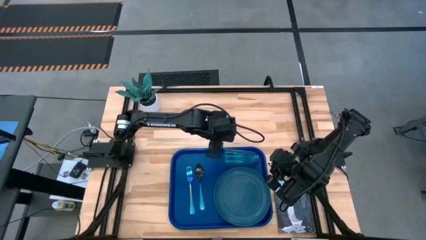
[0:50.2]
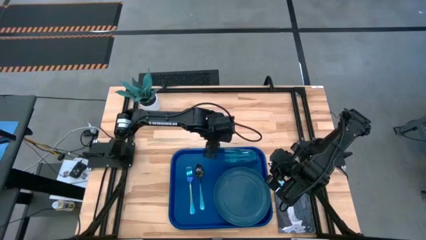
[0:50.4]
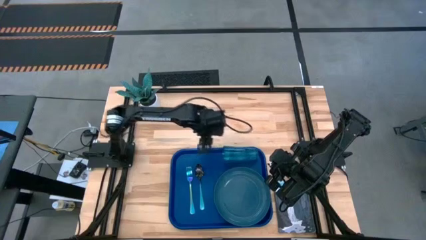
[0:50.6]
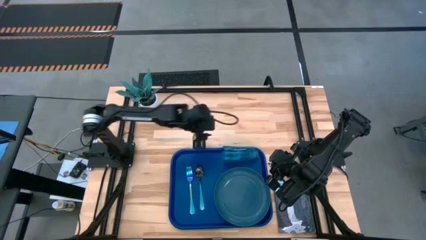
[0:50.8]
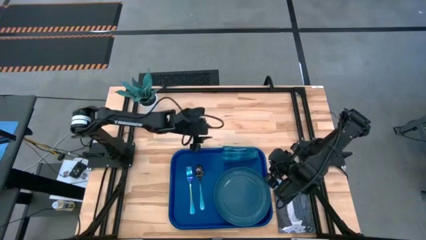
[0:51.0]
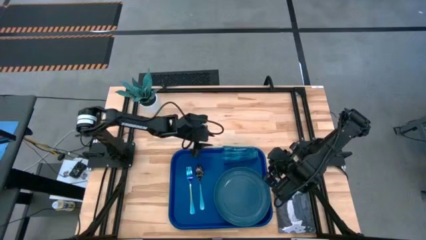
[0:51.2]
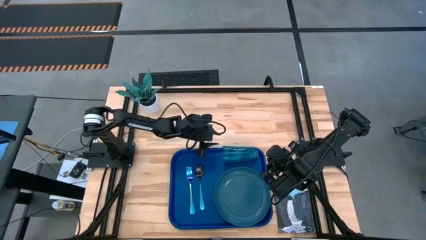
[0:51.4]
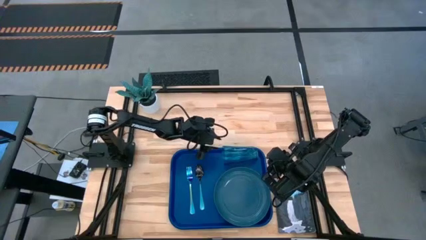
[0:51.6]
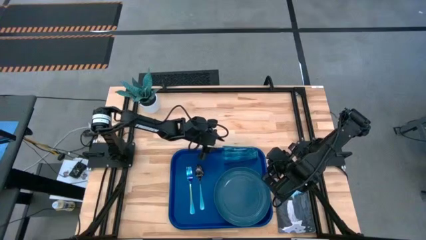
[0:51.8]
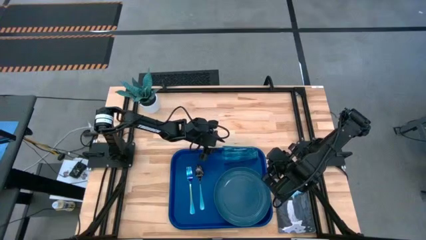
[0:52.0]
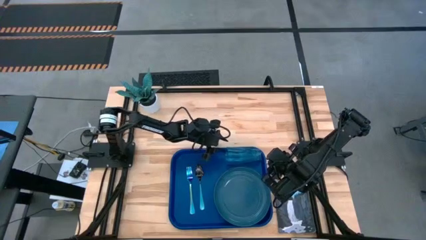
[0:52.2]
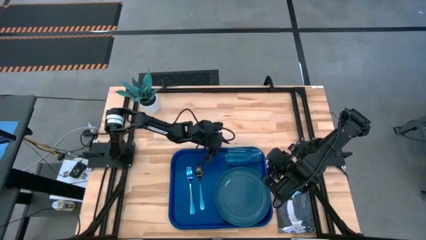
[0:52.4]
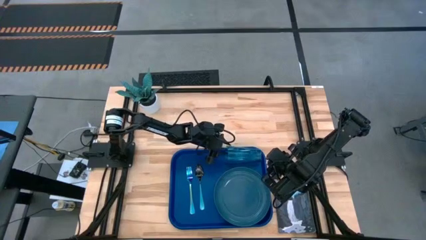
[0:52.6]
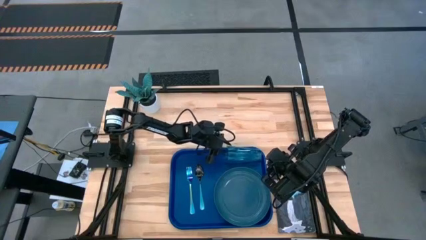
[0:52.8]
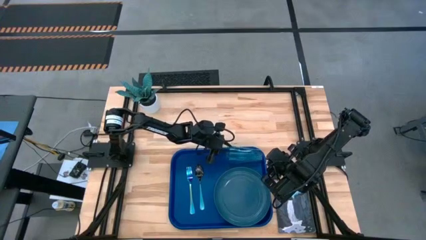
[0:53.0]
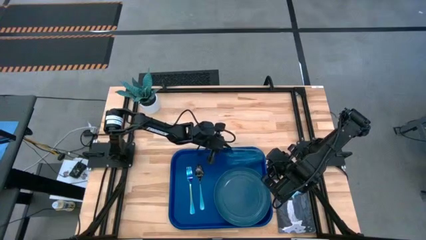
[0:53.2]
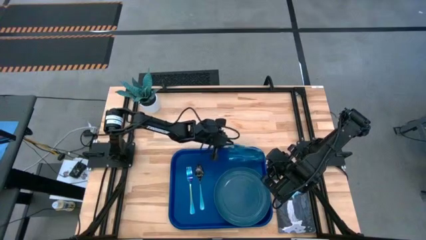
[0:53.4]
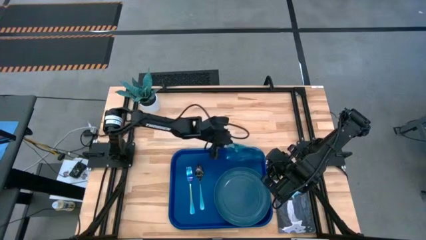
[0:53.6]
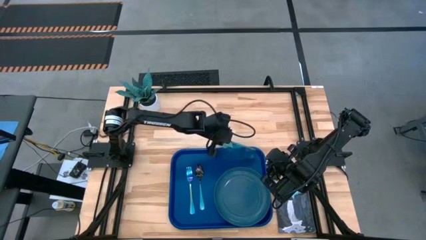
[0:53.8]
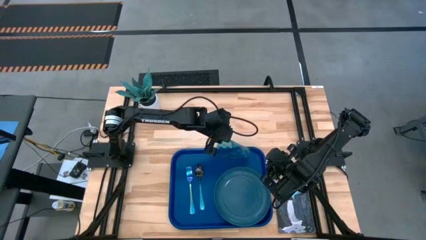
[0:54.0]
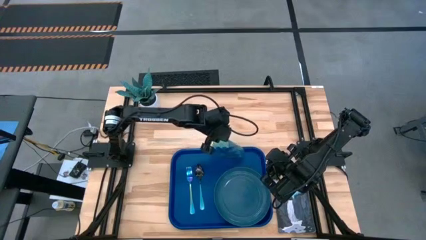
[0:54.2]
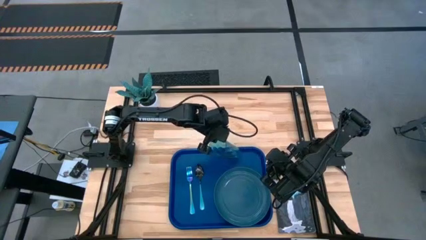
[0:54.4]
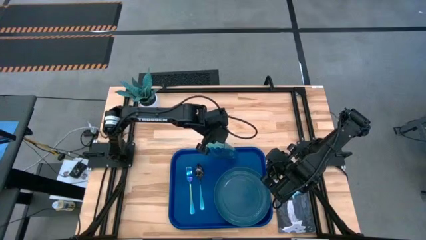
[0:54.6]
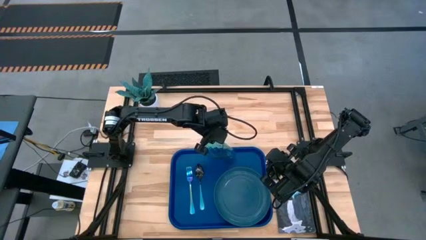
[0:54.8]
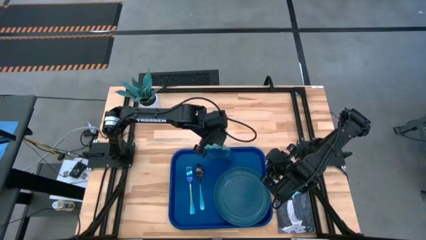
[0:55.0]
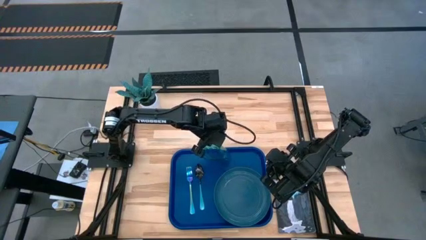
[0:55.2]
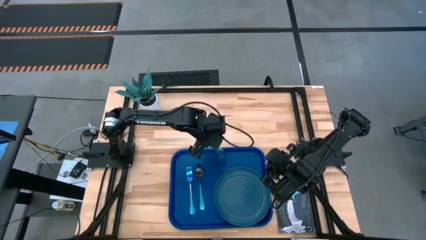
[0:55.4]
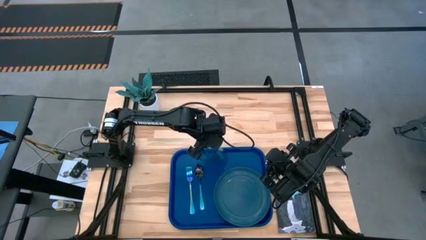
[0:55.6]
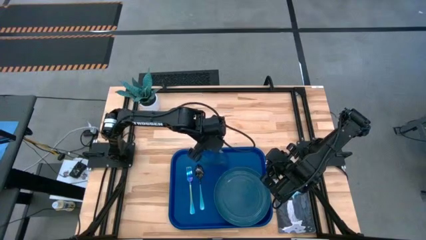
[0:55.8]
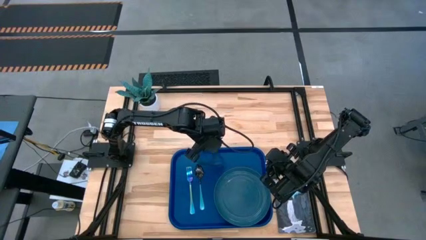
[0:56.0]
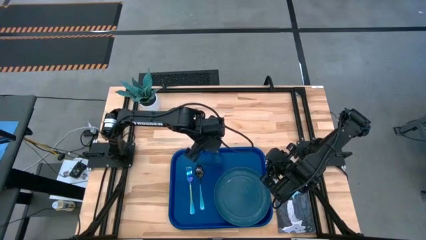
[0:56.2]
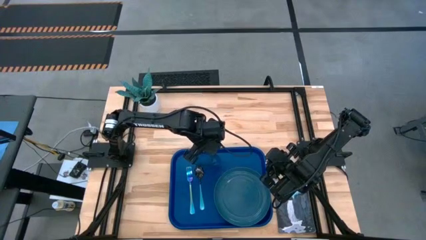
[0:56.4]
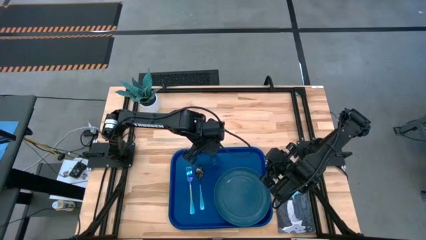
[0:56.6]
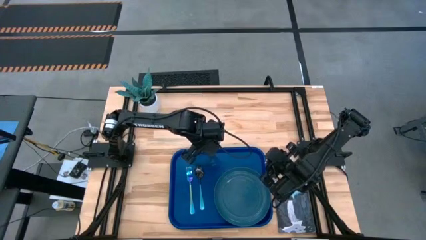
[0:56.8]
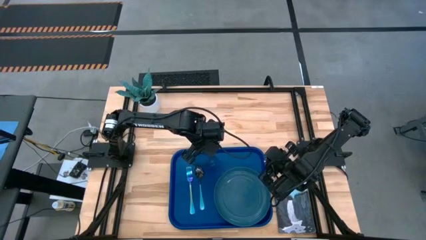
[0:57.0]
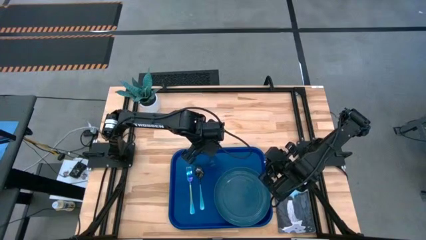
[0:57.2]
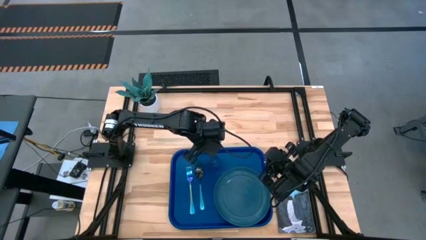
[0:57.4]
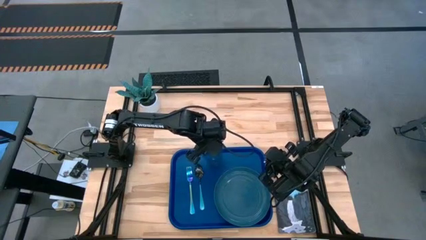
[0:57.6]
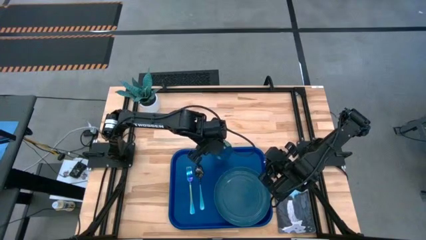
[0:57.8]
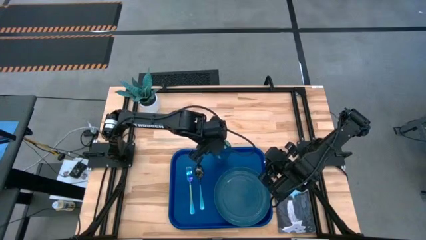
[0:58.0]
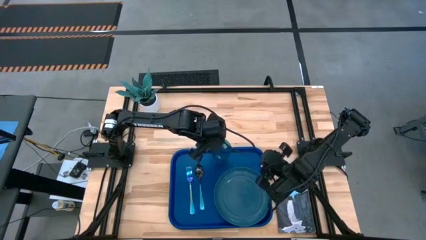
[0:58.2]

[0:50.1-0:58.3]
Task: Pick and place plate/cup/fork/spoon on tray
Put the blue cup on the blue tray

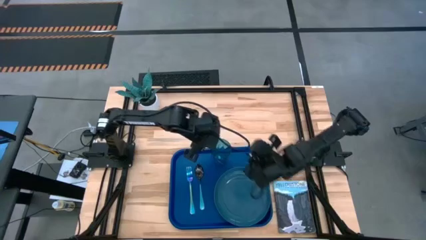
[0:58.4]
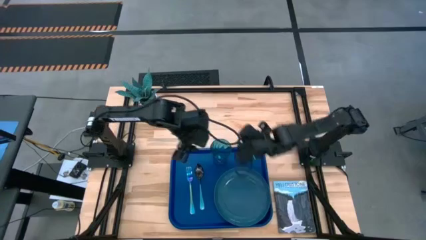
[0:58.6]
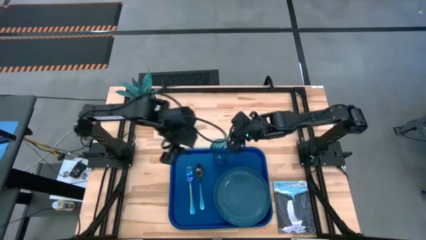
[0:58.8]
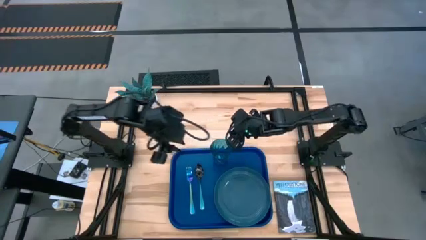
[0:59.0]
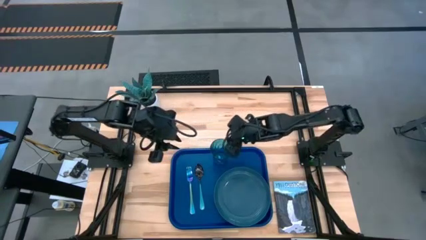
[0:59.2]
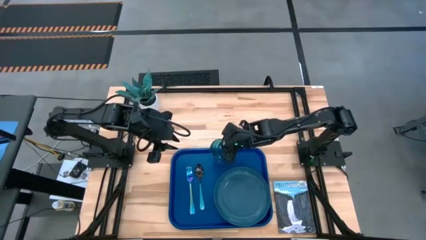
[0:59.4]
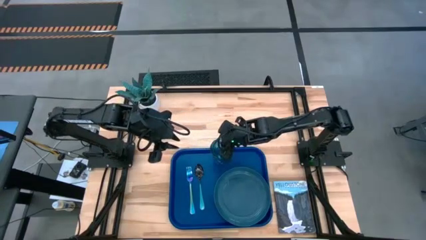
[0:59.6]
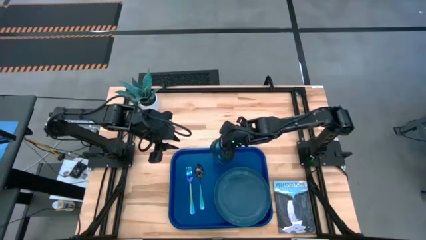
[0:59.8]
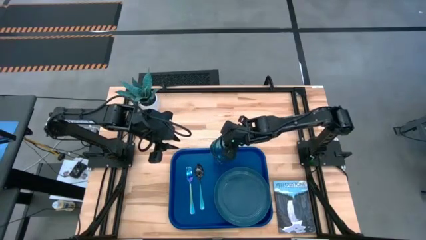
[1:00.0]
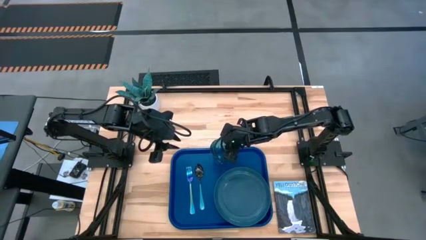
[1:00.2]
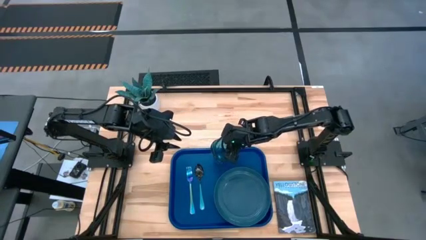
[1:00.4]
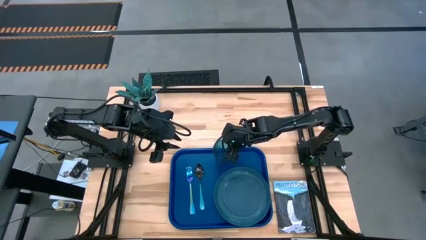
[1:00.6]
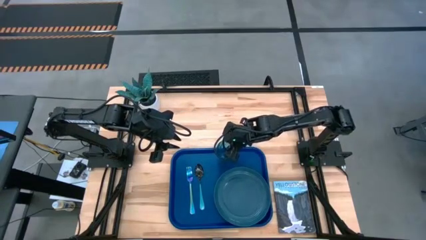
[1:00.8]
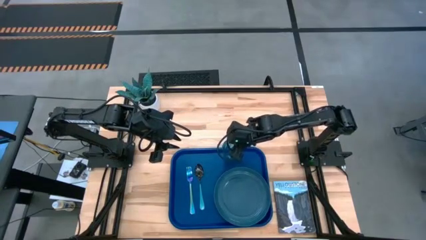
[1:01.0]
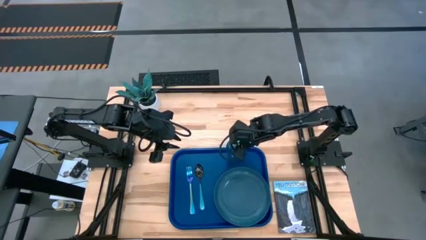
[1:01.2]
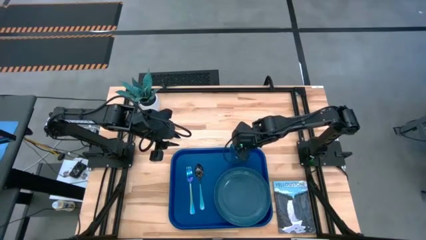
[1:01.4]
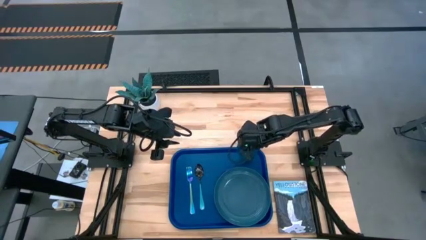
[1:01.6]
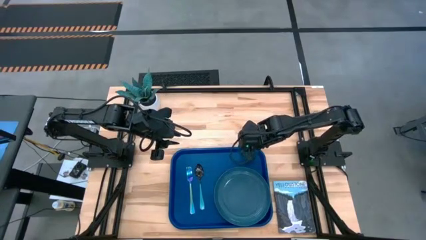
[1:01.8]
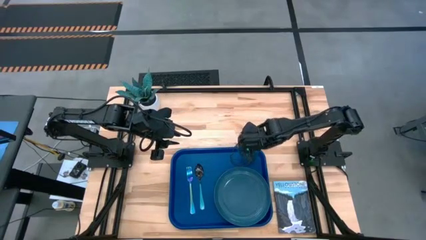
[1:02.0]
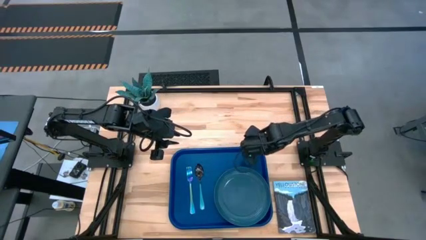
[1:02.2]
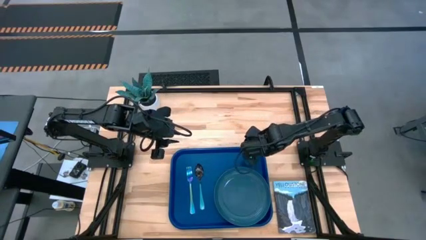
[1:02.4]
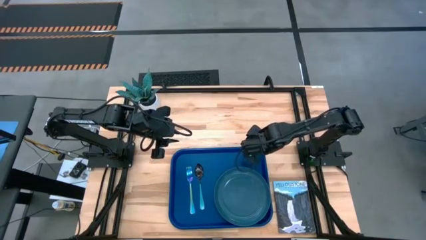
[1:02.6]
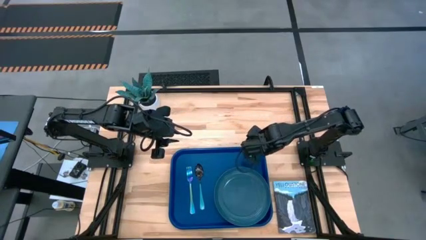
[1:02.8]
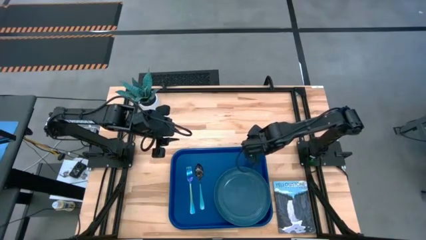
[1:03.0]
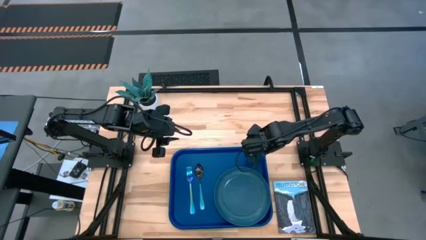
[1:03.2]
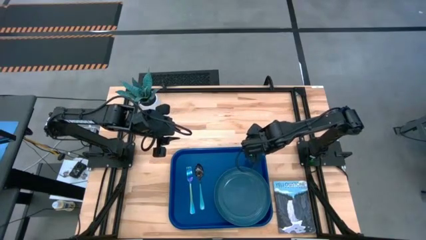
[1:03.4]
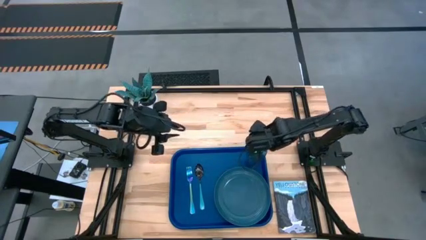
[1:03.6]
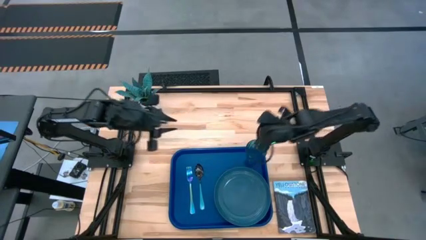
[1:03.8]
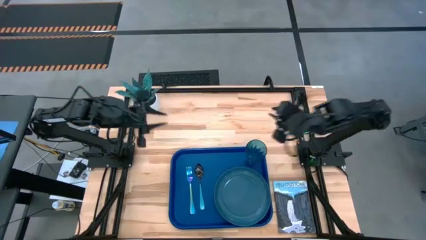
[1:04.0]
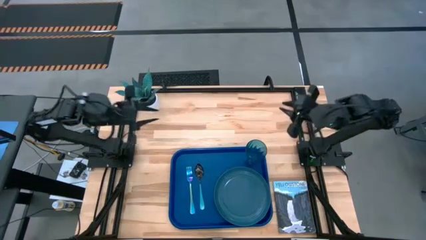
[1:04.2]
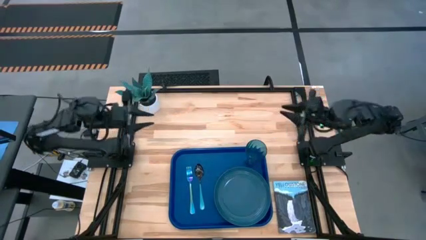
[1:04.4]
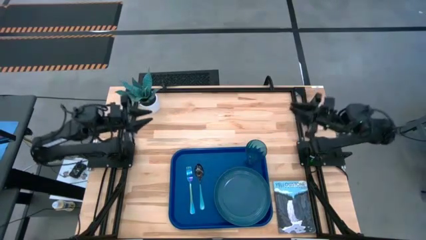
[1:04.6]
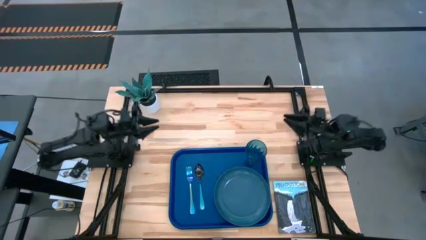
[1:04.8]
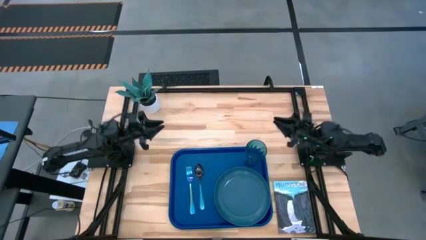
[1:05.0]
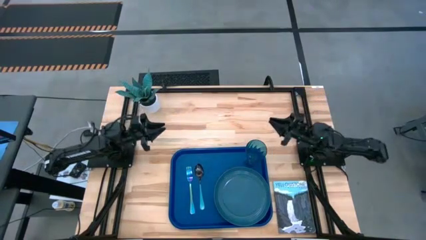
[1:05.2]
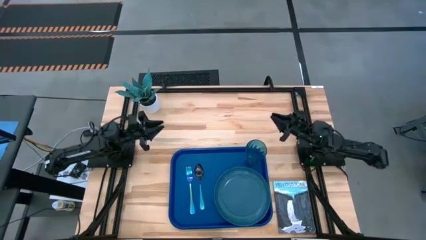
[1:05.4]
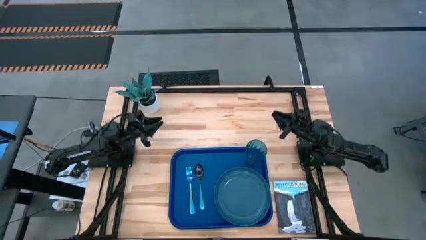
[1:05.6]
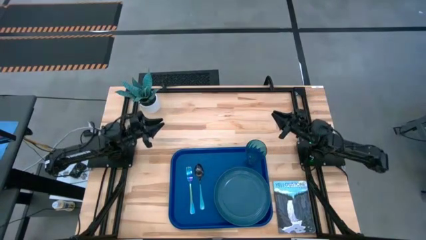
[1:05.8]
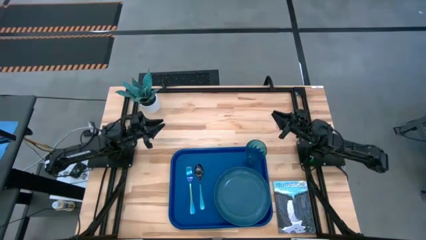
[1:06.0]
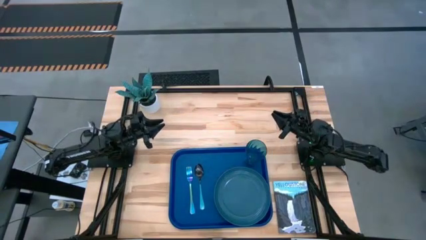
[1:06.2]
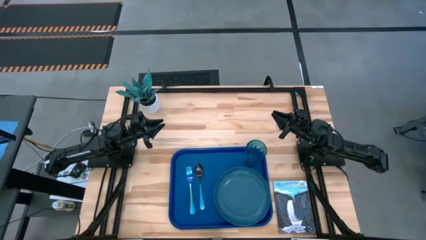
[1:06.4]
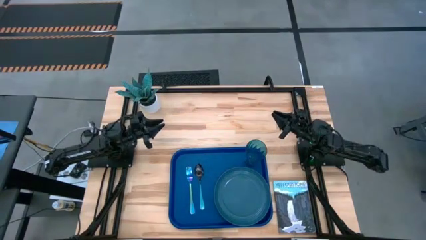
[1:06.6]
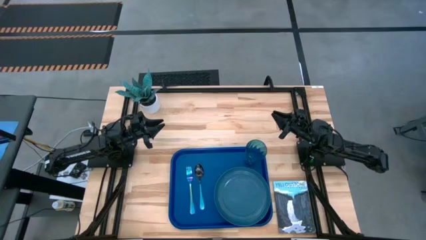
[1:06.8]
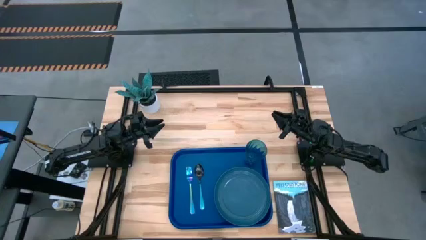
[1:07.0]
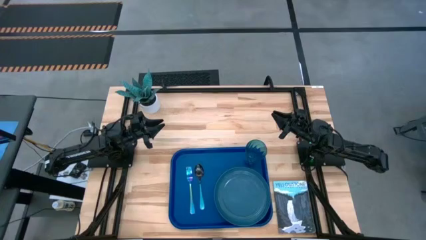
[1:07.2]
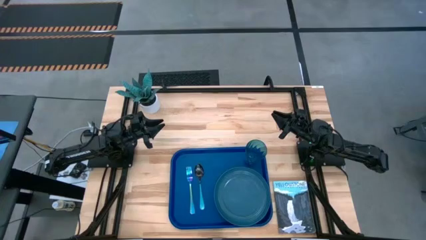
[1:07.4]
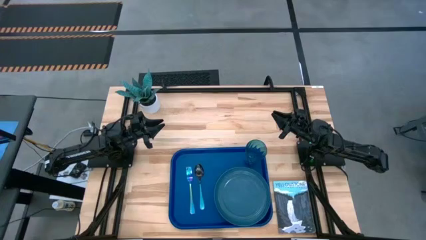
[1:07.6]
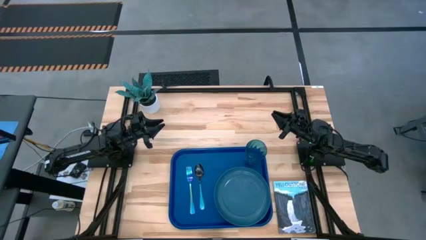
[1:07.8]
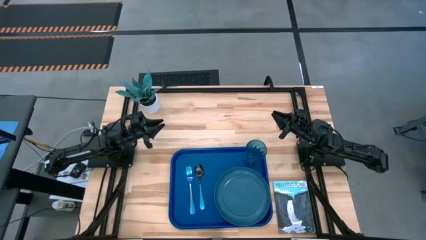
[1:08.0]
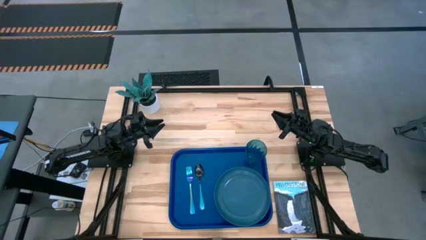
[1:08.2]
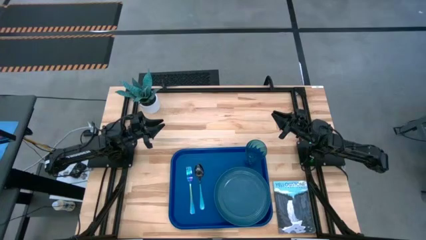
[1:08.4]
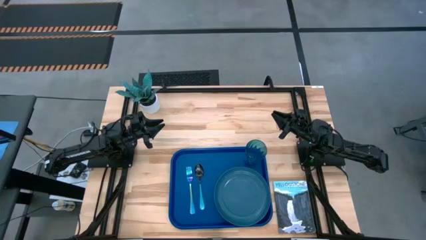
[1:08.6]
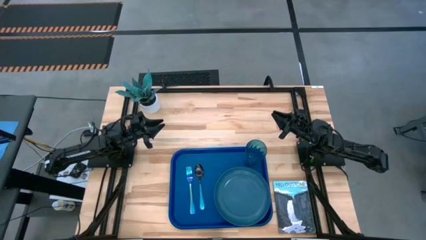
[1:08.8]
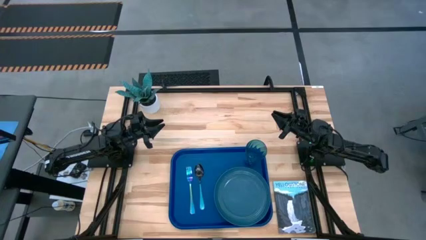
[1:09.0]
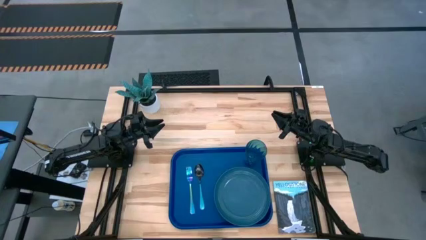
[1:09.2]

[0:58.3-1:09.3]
Return to Home Position
